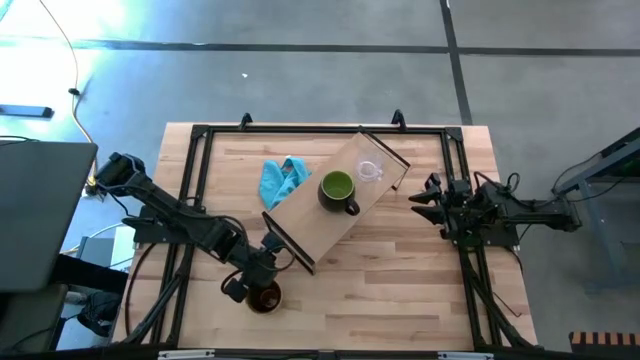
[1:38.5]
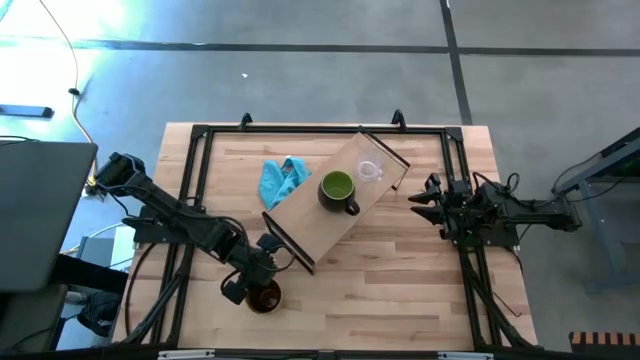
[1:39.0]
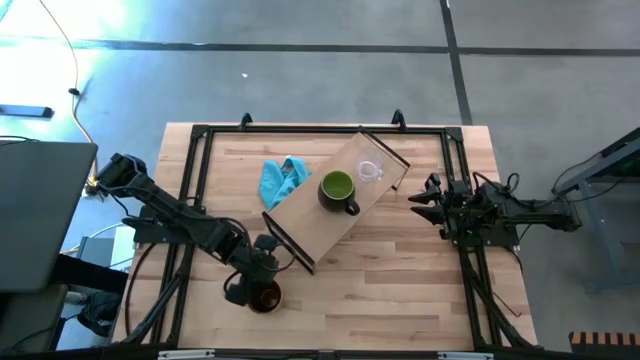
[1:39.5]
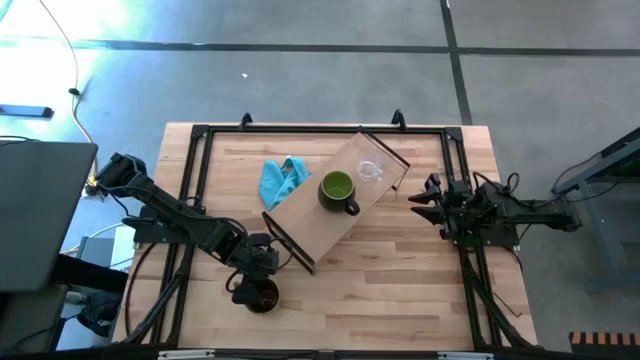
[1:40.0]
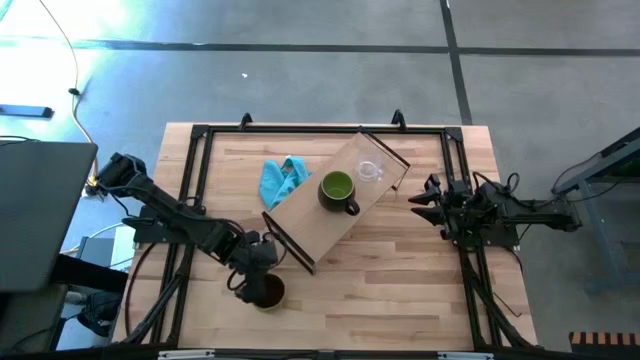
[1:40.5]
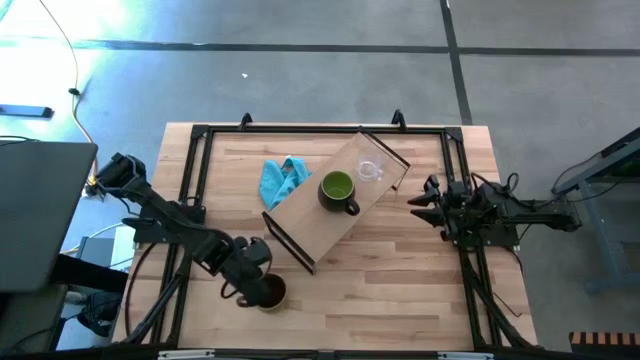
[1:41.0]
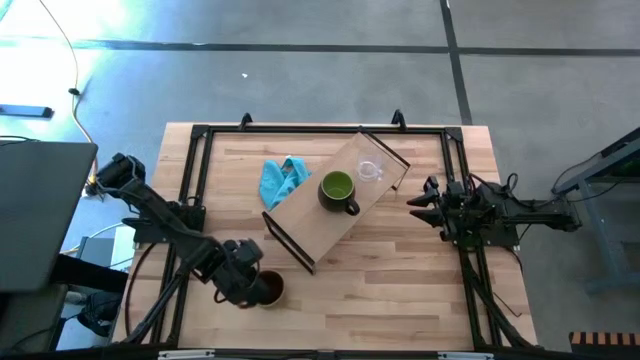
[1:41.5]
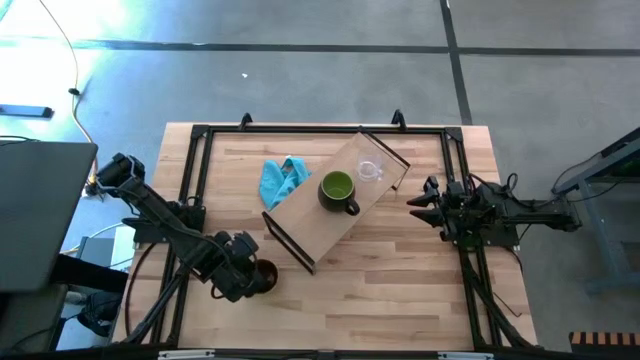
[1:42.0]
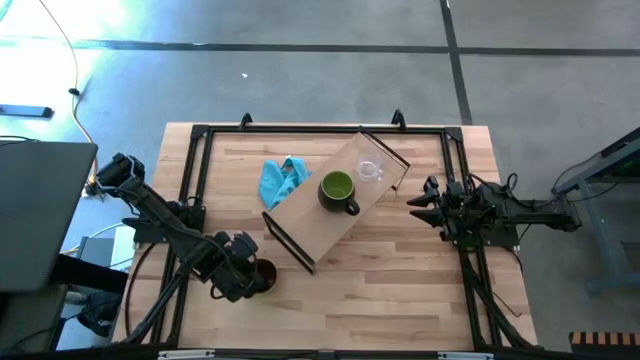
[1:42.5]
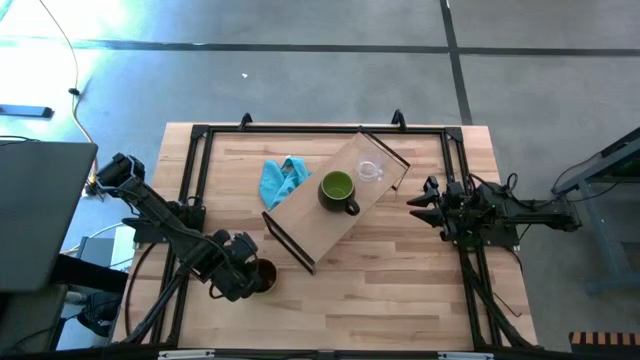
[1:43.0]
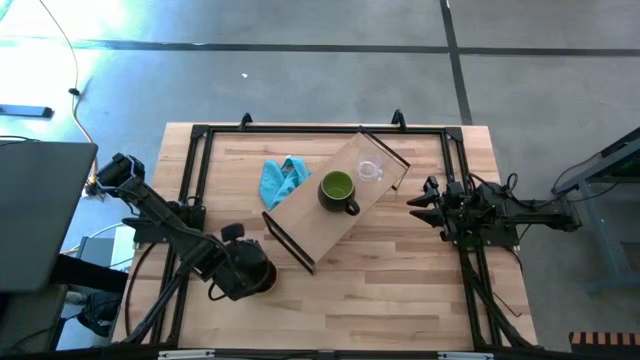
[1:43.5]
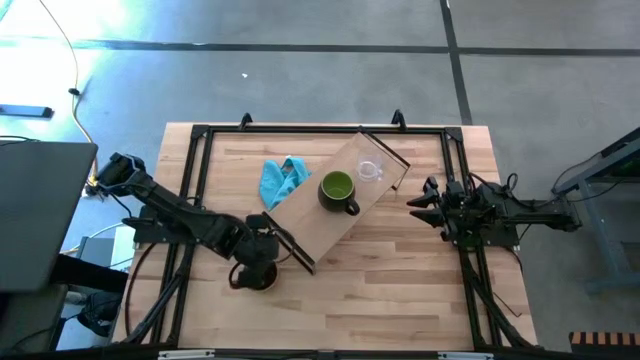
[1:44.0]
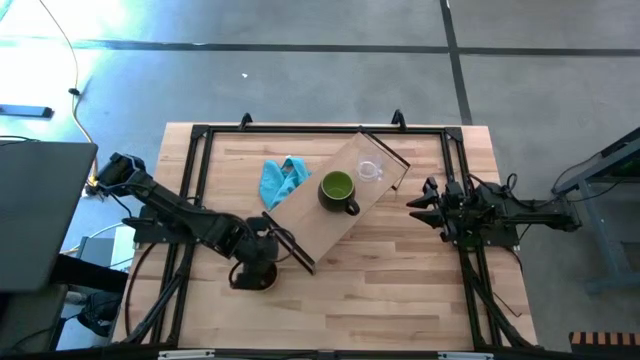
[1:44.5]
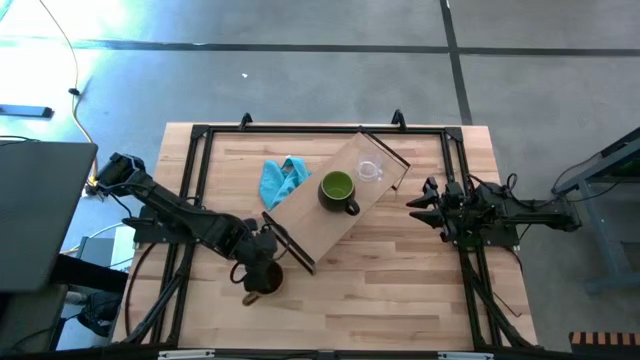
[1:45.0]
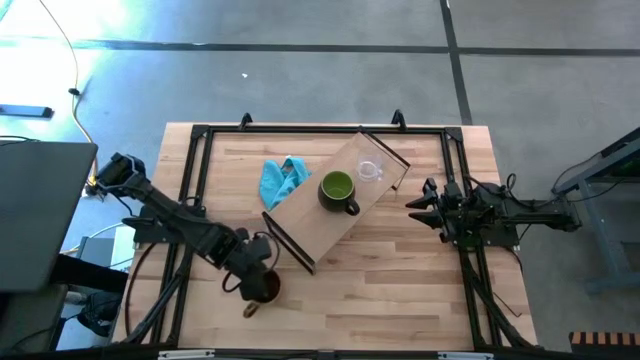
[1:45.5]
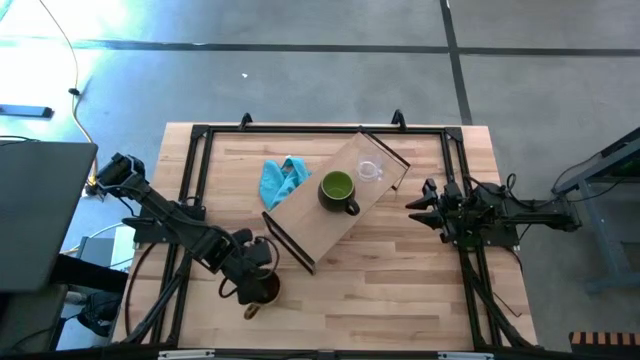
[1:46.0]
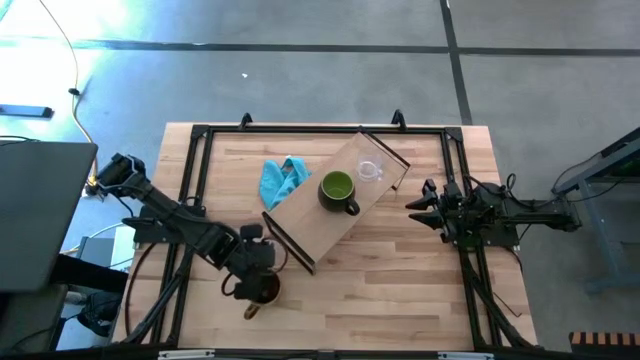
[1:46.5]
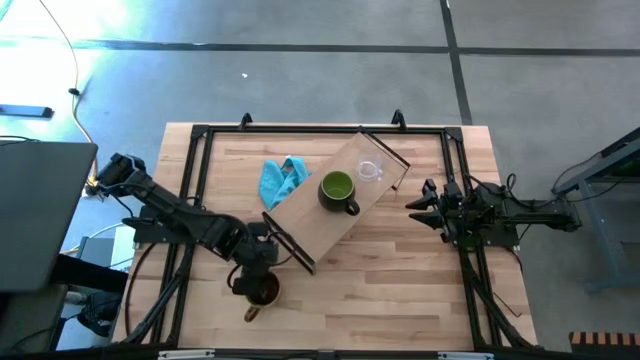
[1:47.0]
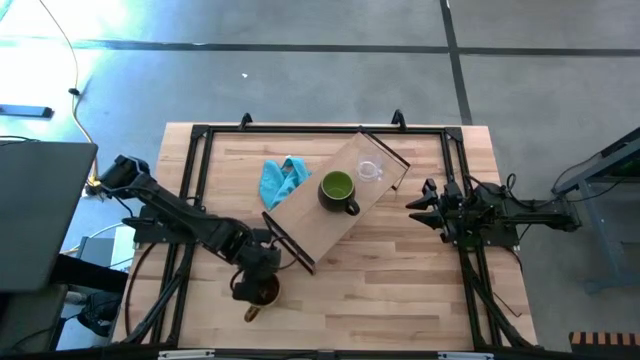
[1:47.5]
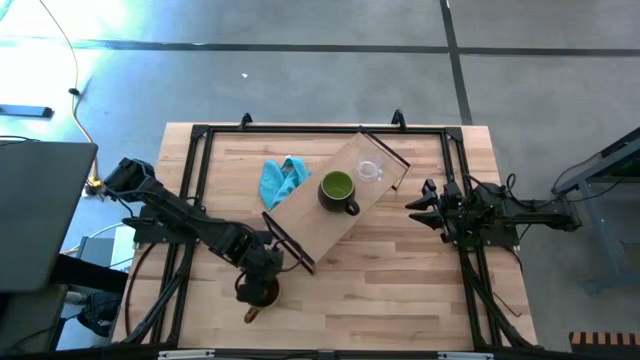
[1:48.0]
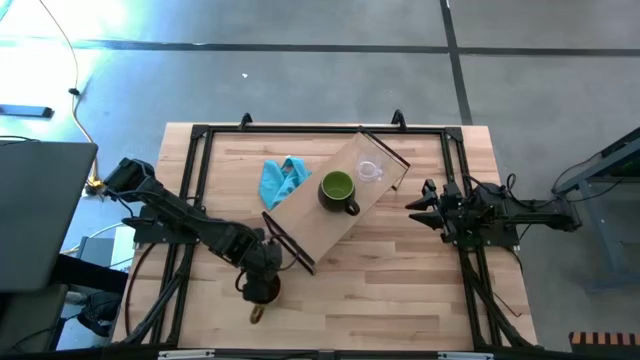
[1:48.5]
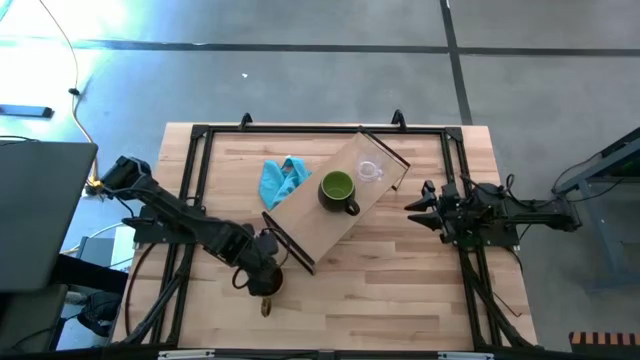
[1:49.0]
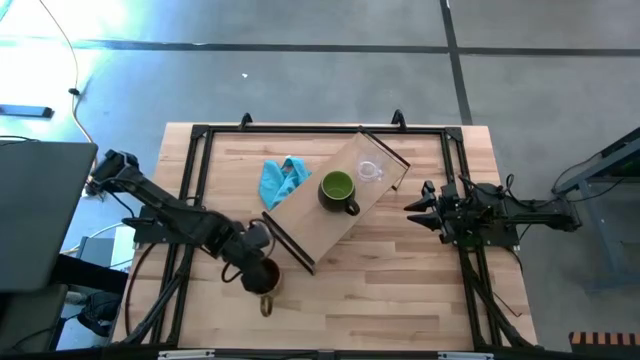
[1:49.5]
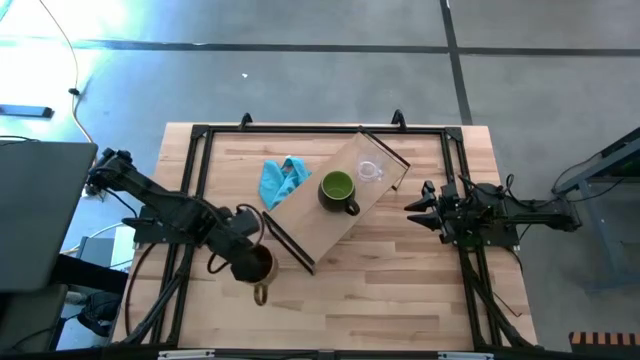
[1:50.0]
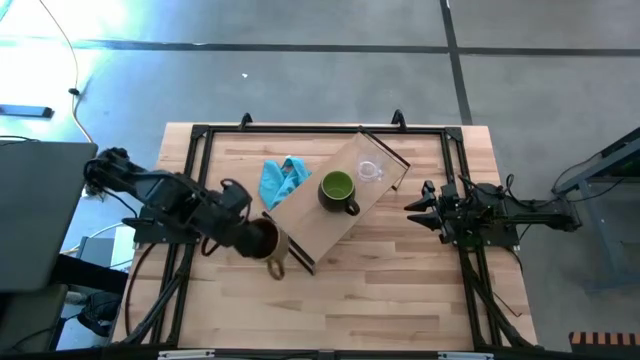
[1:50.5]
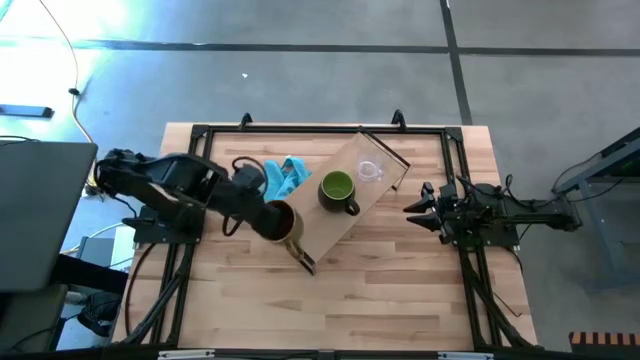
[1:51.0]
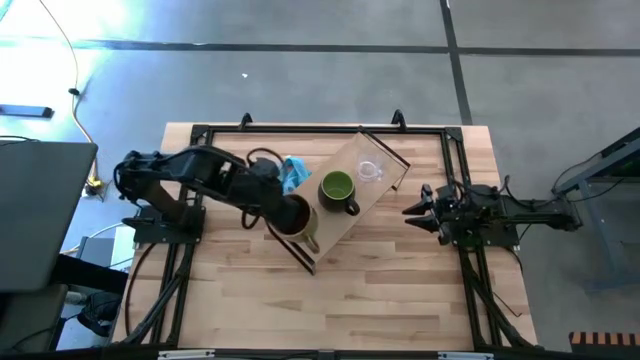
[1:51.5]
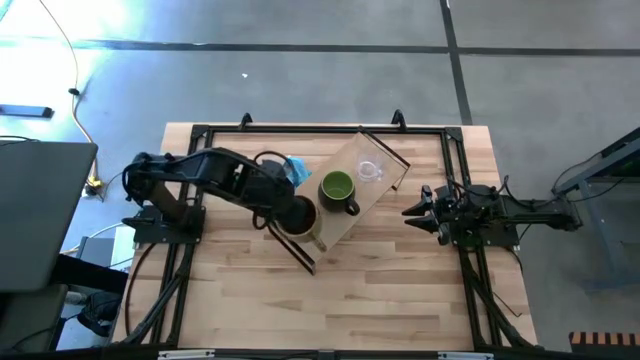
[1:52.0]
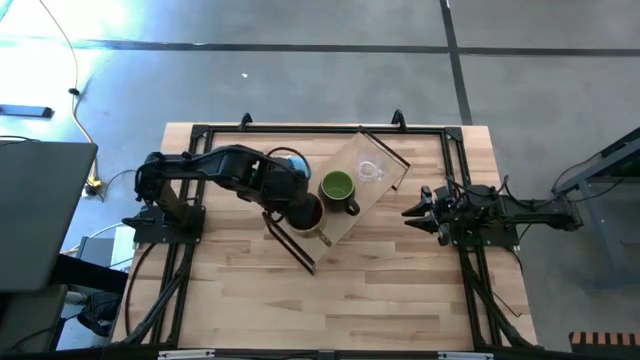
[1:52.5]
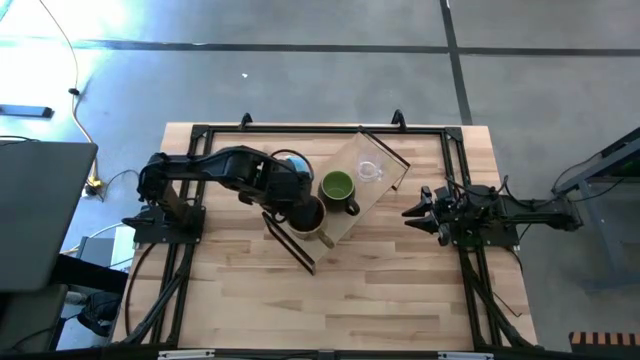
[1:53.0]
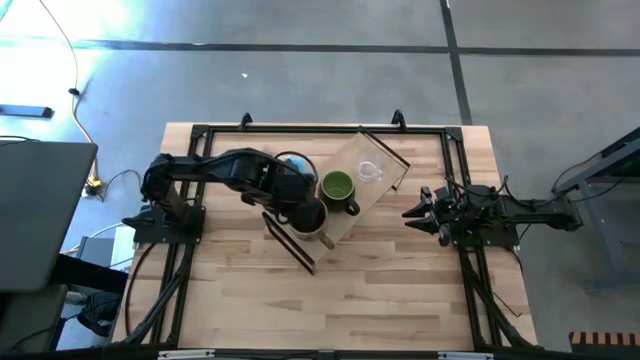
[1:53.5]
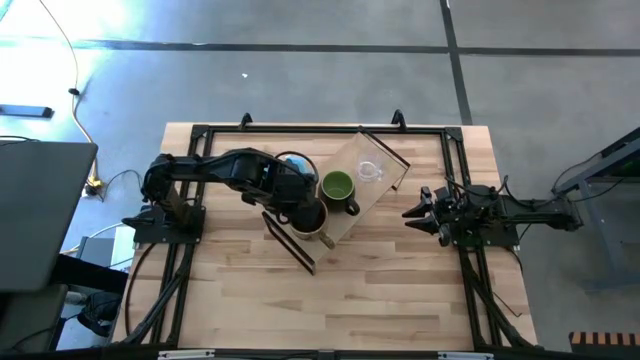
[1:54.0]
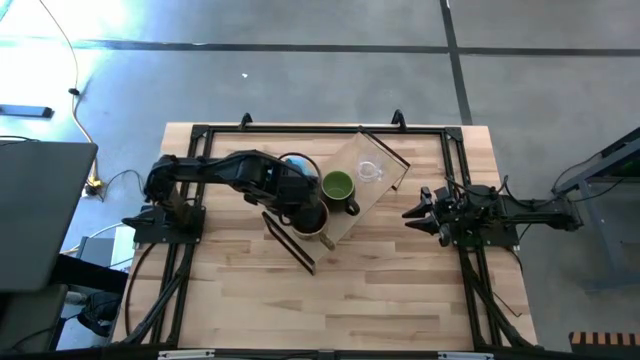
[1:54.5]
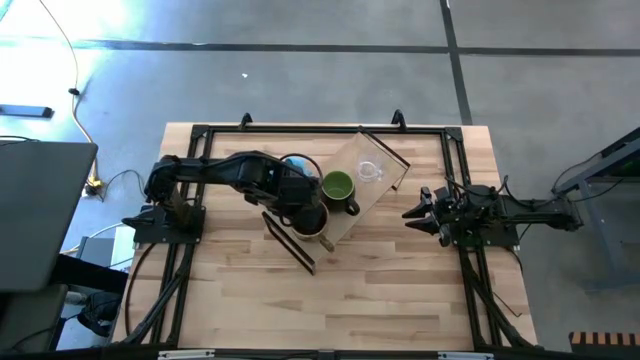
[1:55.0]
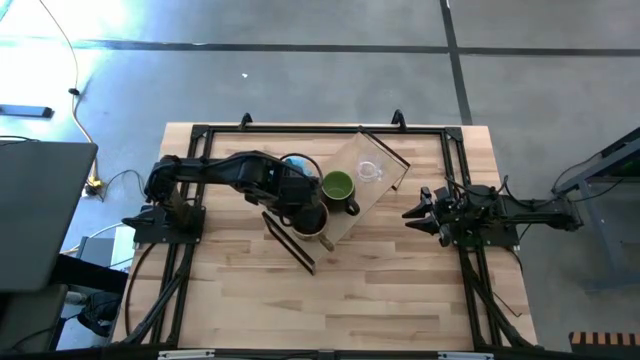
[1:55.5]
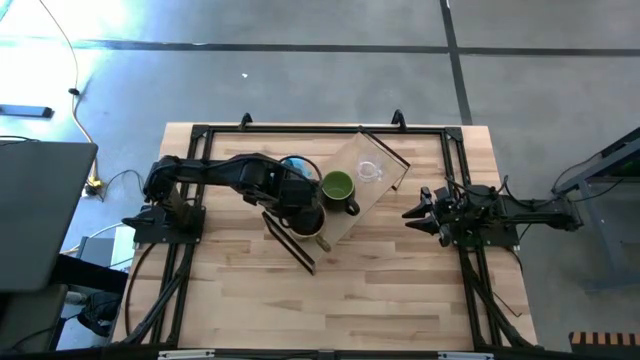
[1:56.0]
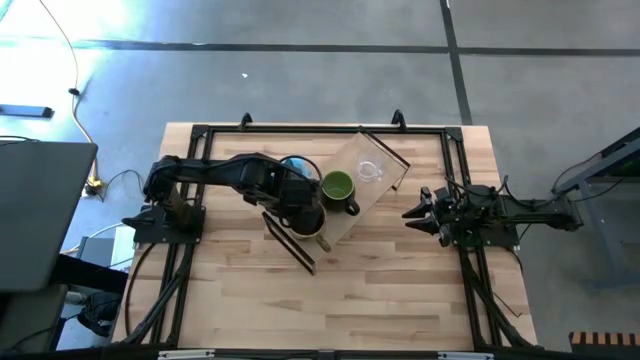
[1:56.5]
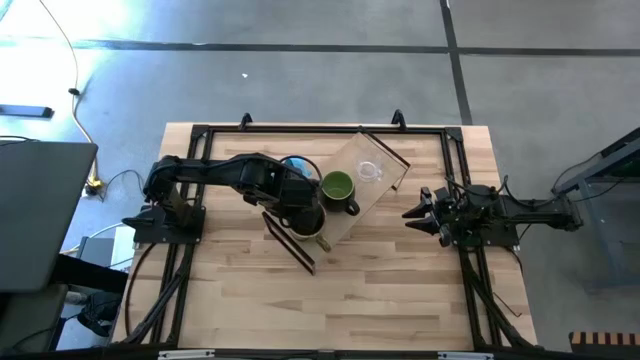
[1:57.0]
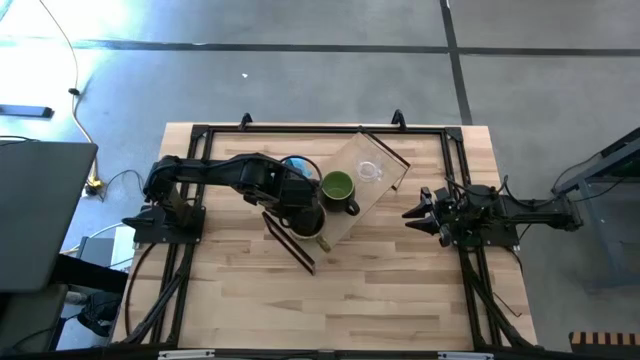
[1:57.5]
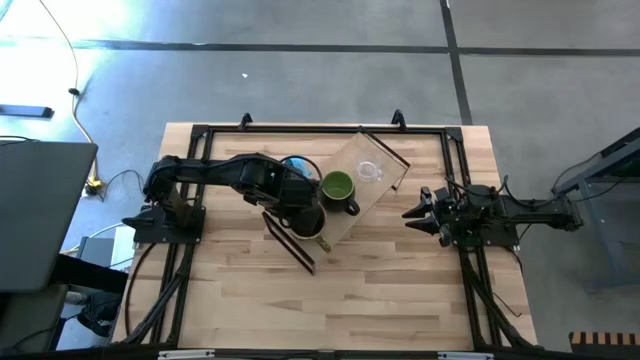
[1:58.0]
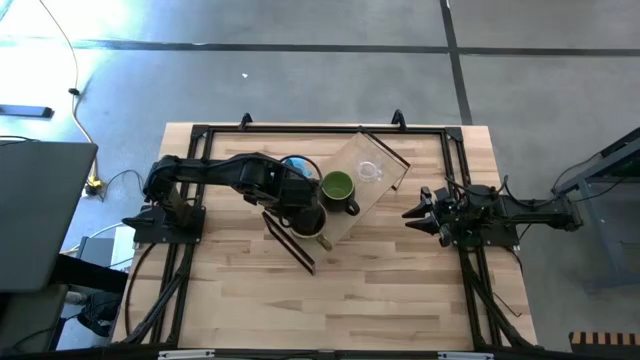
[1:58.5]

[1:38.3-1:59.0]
Task: Stack small to large cups/mugs on shelf
Put the green mug on the shelf
